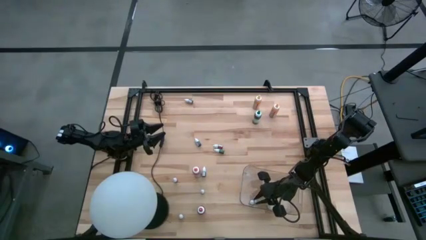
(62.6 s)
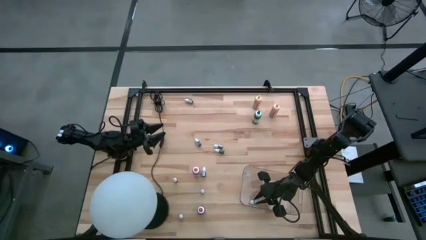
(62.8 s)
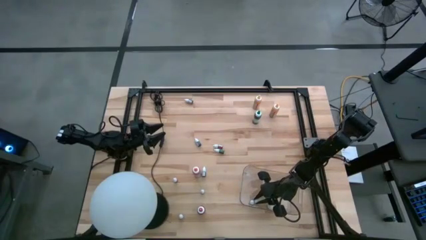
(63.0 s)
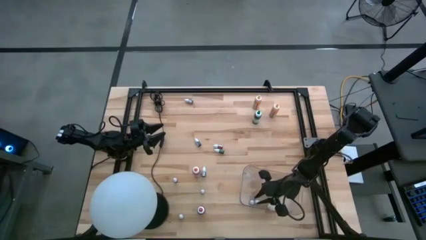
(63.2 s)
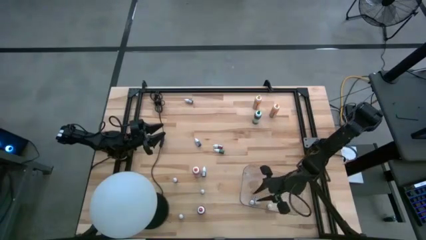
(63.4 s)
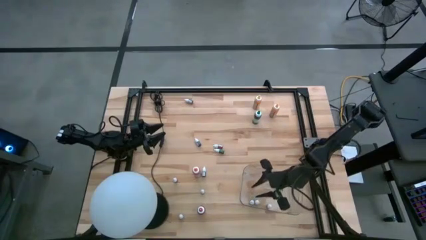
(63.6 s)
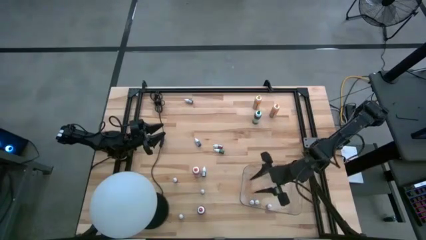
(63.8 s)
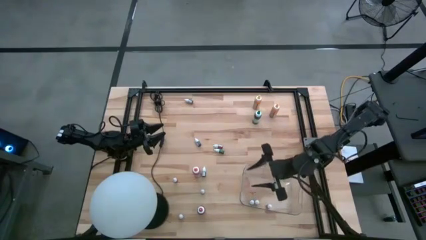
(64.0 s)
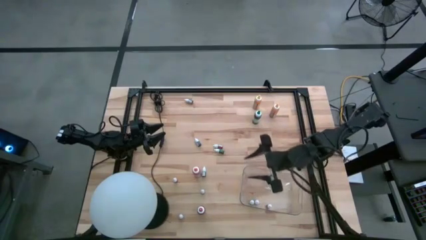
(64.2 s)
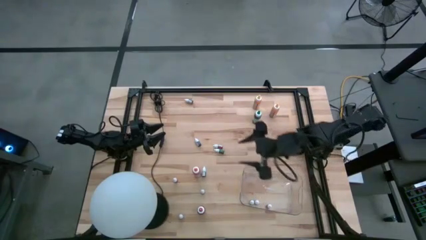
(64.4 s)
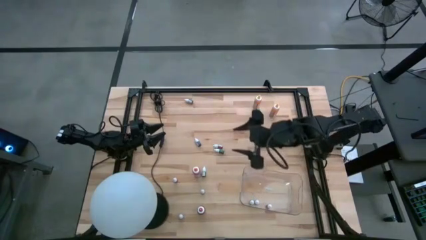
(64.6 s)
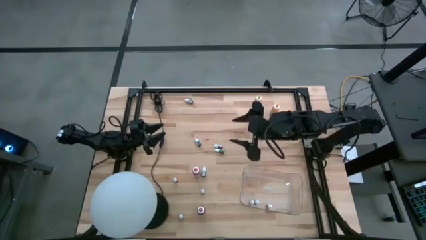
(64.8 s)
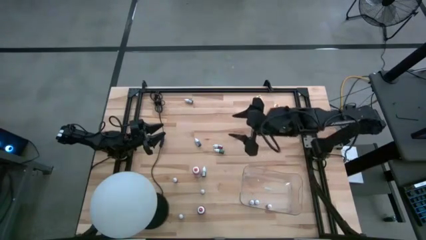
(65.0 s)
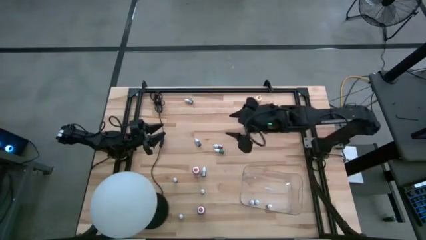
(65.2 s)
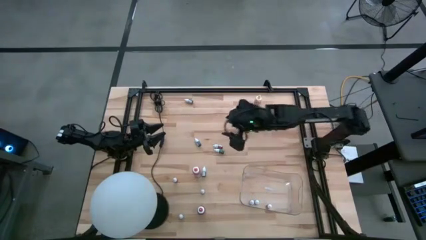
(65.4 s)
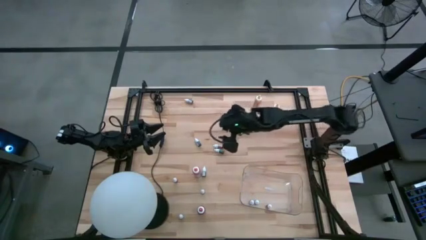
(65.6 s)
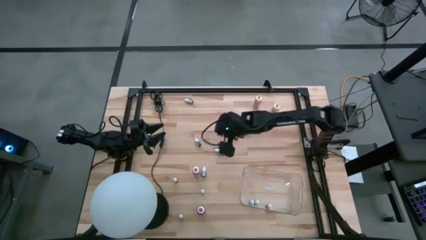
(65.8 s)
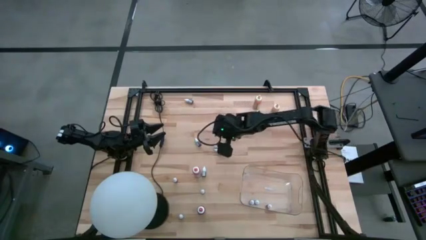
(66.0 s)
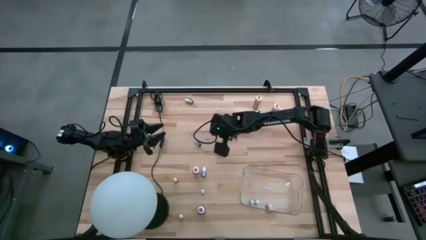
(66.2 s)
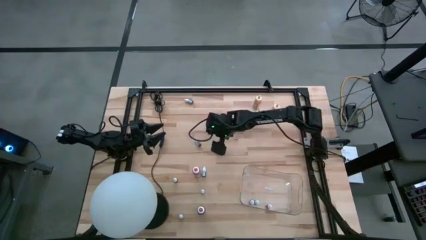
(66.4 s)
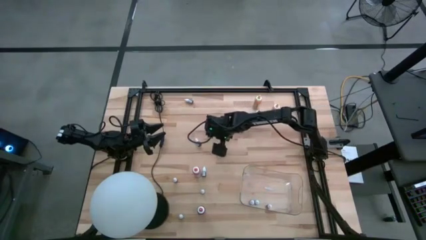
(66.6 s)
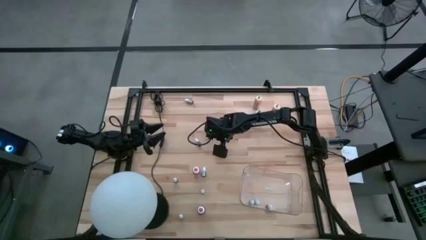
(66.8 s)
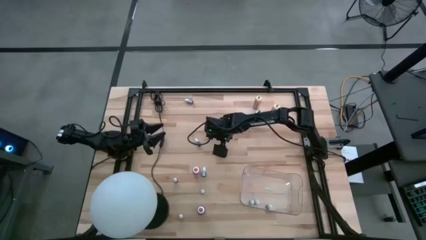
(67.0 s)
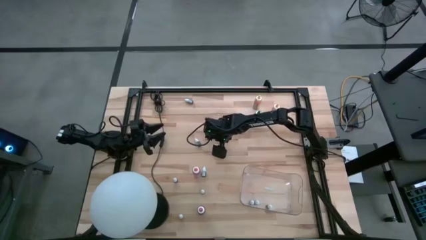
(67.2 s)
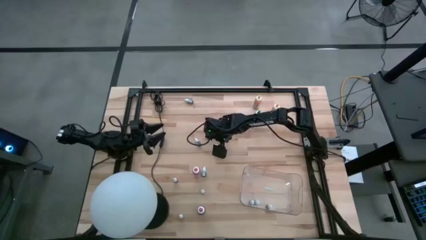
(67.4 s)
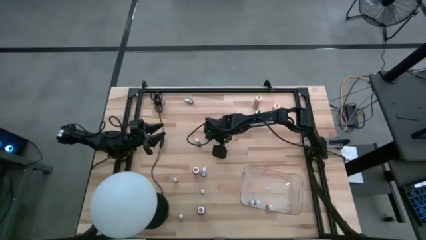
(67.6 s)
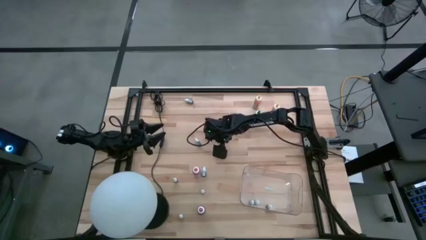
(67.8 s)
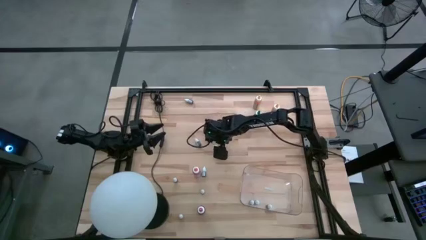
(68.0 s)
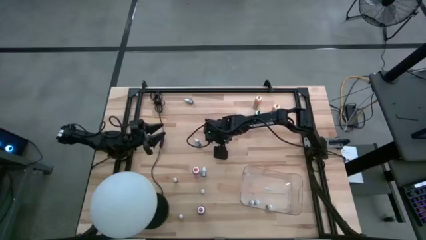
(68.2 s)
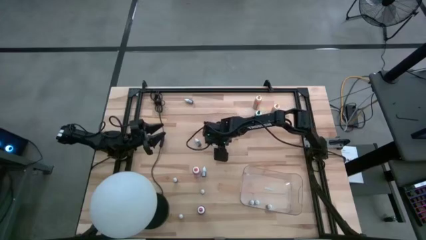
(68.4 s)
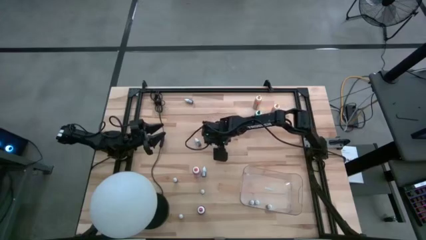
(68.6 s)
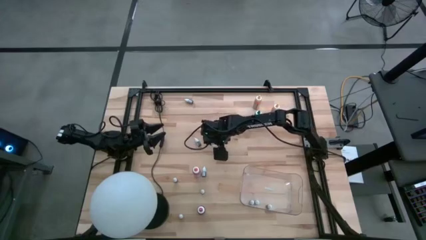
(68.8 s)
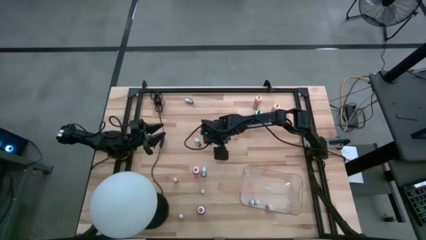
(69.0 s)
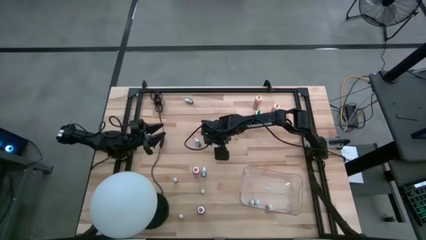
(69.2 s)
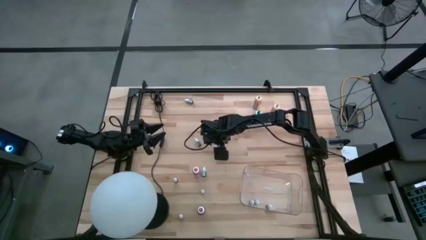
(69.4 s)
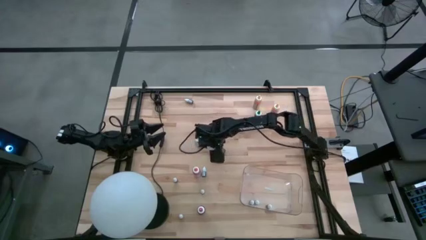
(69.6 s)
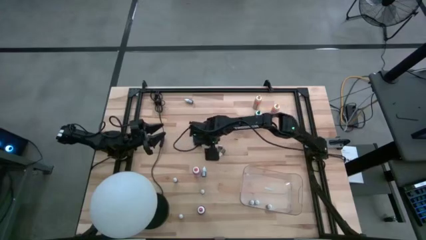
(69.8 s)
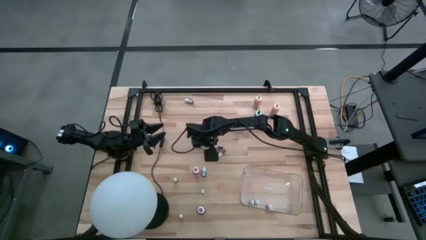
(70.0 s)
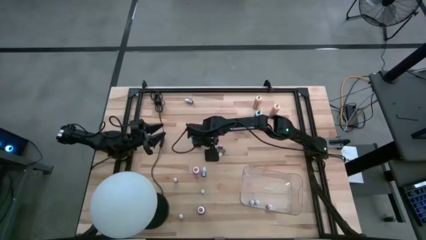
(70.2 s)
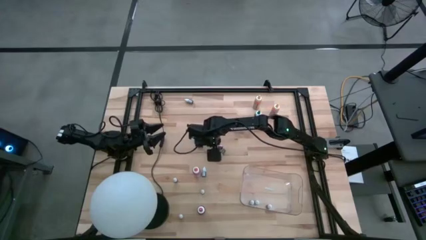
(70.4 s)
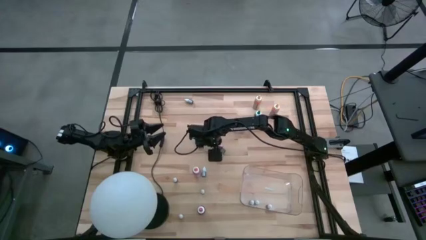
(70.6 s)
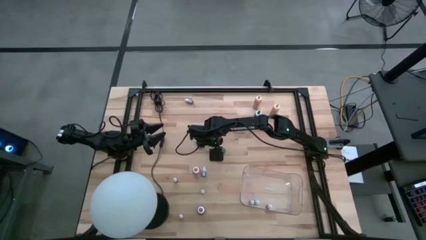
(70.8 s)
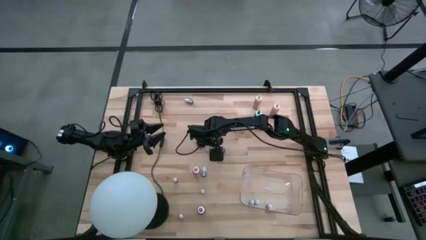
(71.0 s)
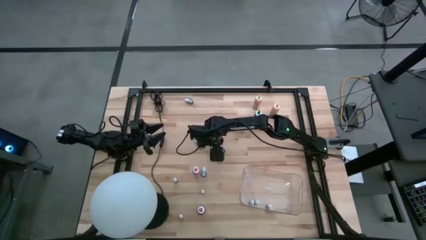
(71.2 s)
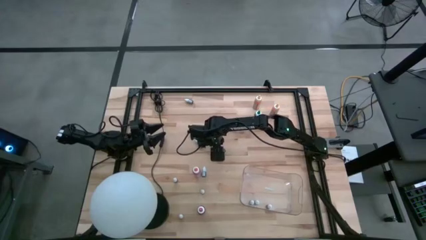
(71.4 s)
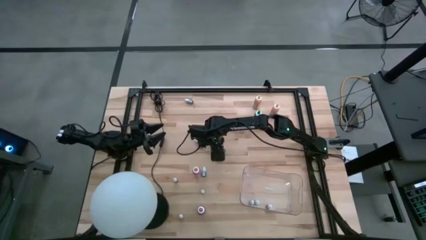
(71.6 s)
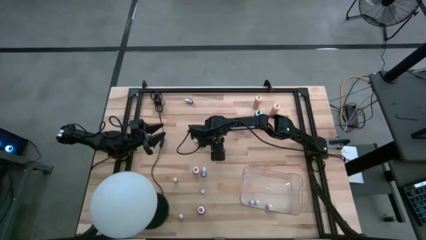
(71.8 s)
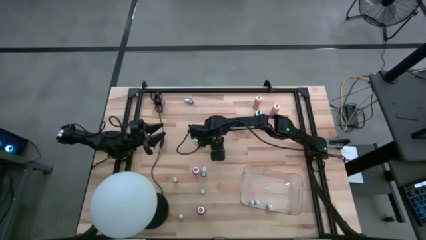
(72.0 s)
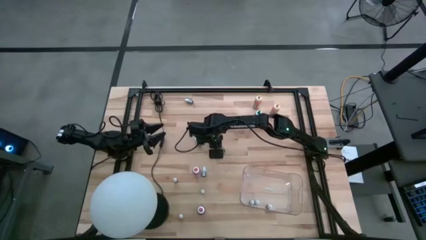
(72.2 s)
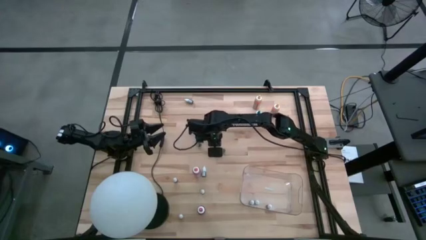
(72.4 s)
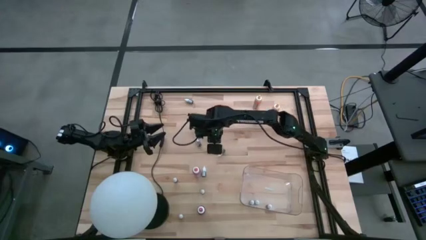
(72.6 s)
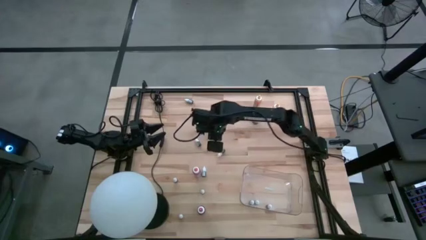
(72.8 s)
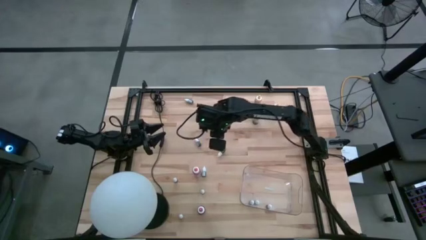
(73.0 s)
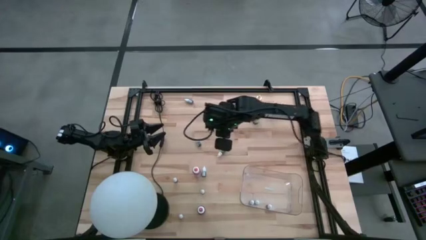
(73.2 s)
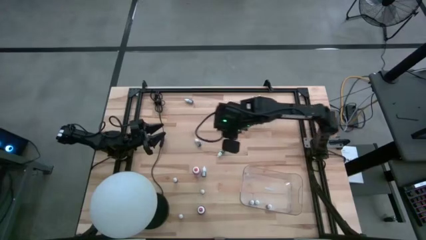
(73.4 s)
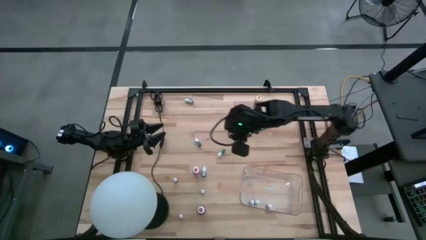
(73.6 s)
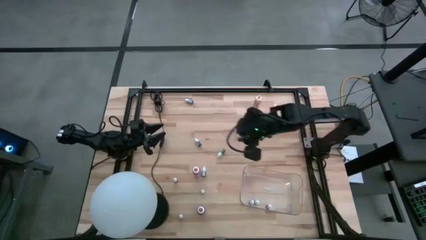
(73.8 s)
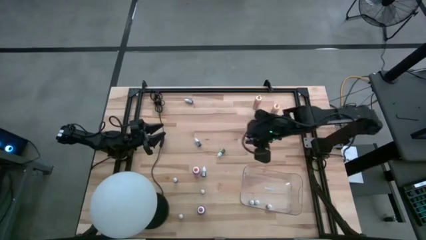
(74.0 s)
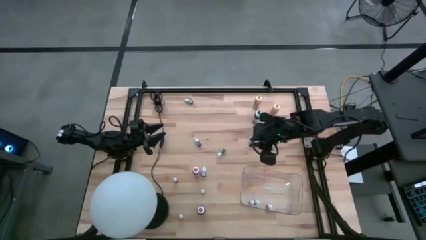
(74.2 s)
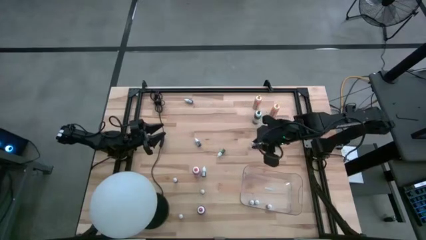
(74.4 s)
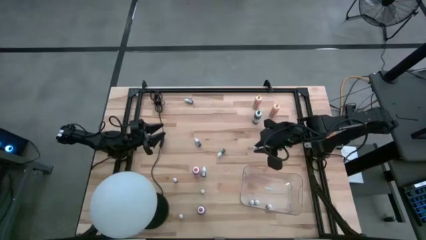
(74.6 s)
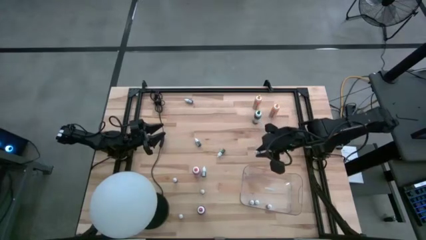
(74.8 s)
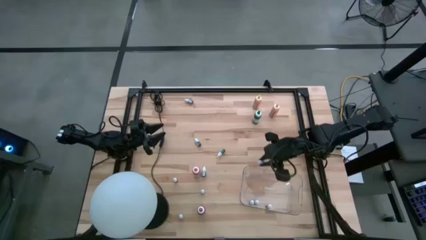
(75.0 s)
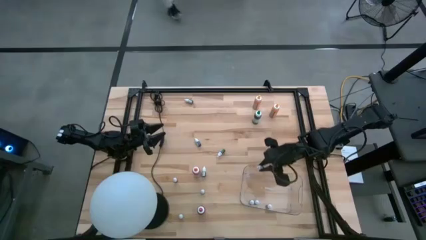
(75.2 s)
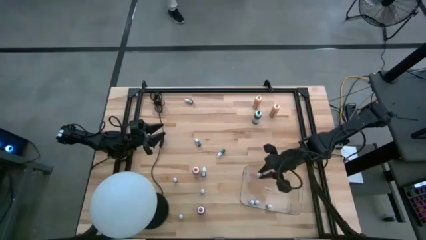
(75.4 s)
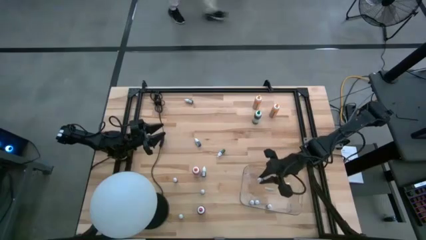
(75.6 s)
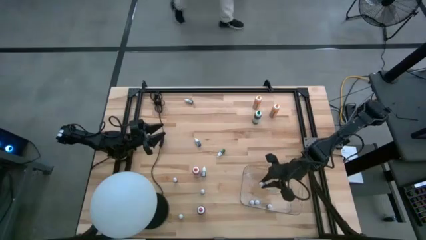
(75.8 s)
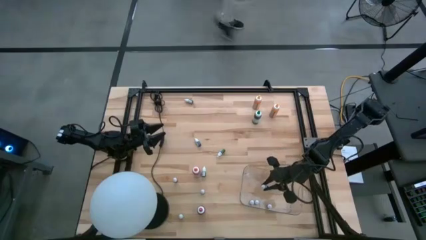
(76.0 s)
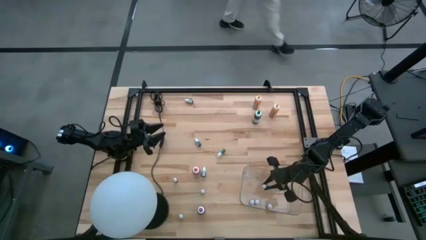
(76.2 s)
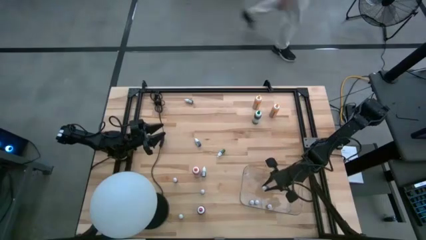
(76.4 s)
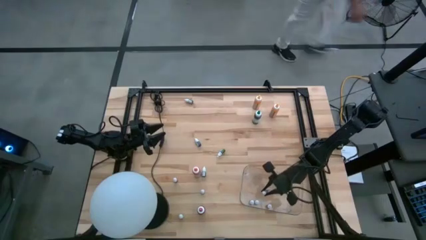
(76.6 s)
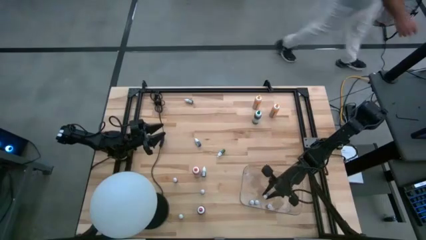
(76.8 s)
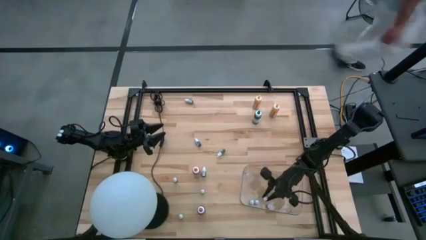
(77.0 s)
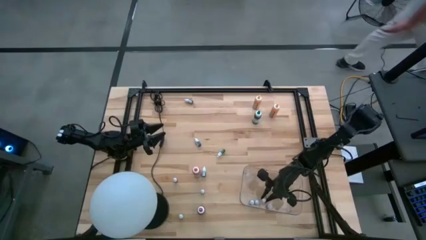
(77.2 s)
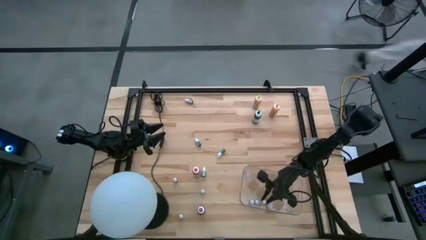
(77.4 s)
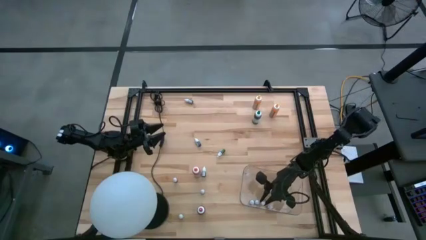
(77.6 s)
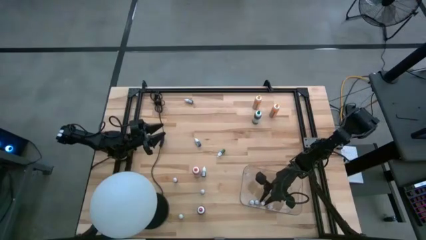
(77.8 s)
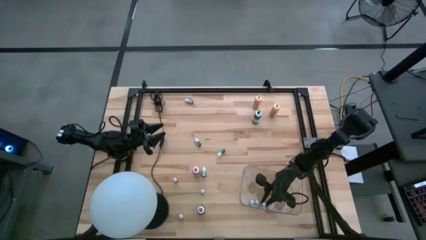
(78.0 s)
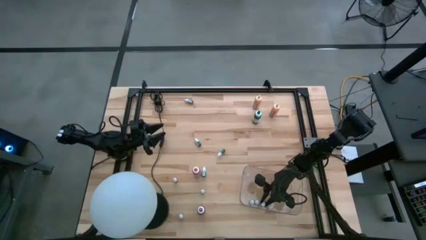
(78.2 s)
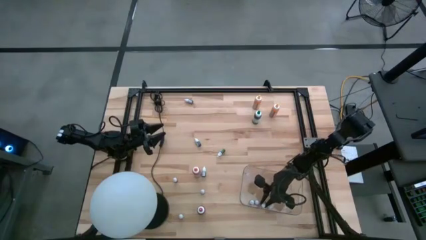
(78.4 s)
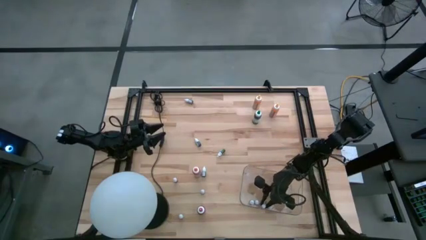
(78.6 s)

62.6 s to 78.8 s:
Task: Pick & Place food coloring
Put the red food color into the transparent bin

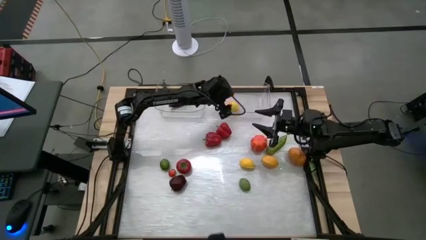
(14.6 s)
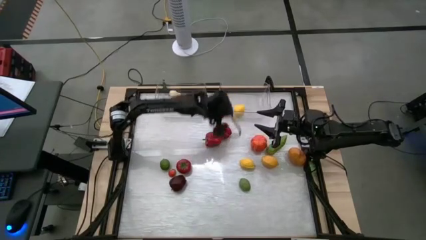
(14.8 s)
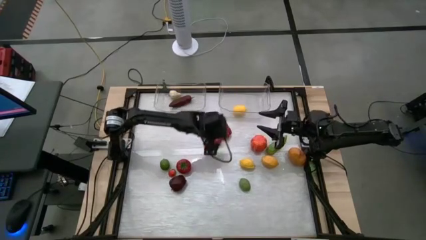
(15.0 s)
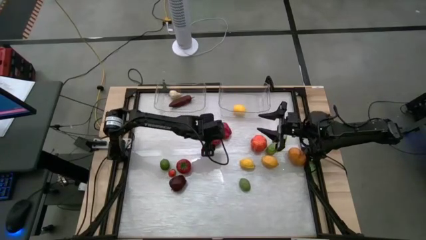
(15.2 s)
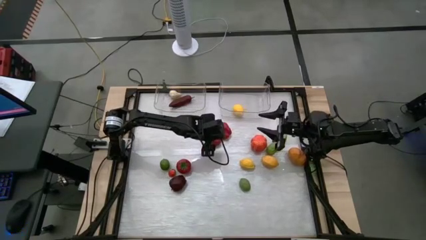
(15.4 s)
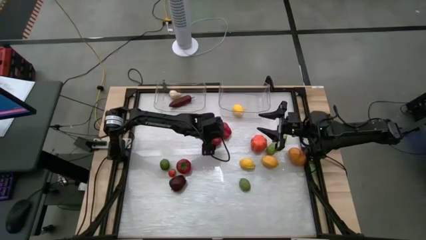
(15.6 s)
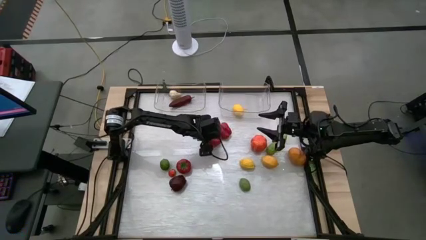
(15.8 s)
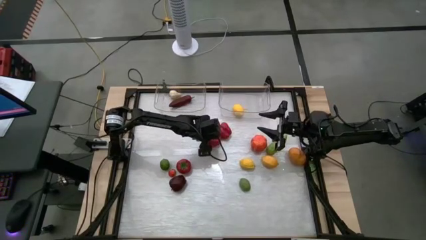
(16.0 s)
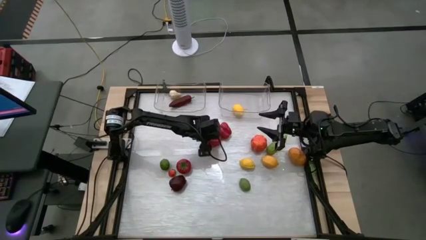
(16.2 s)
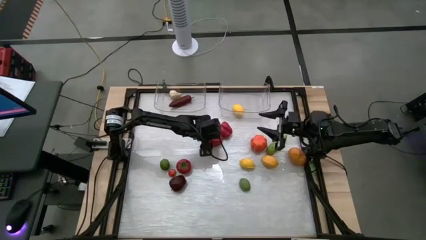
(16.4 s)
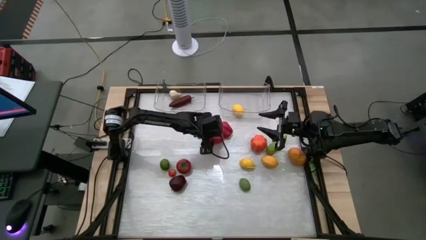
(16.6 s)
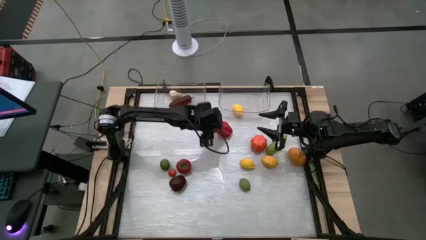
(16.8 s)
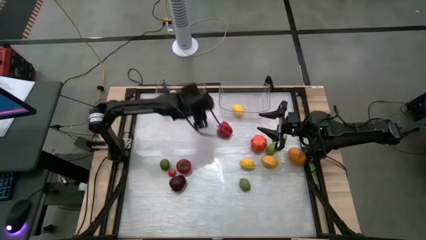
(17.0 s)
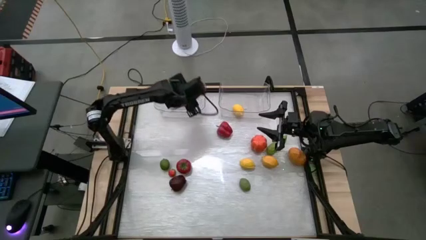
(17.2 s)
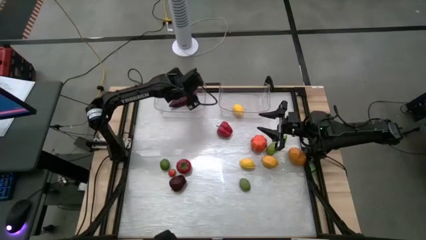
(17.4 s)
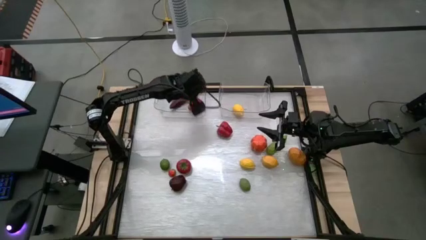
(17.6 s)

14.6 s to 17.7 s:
Task: Sort produce into baskets
Put the bell pepper in the container
